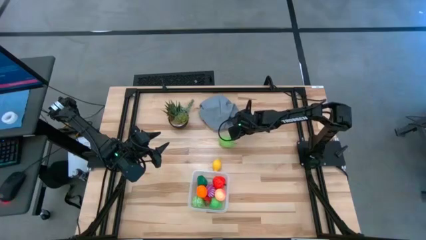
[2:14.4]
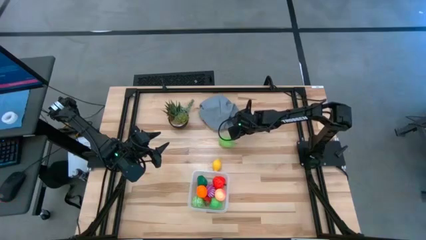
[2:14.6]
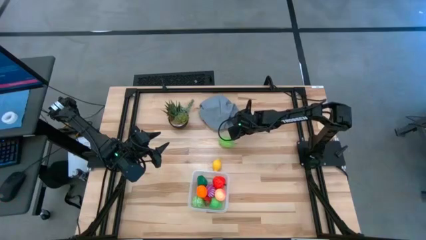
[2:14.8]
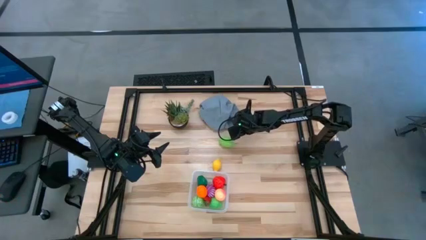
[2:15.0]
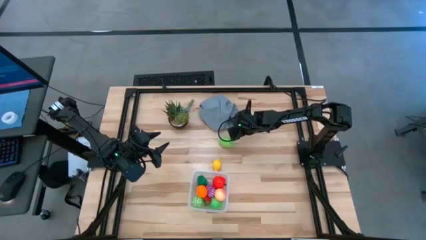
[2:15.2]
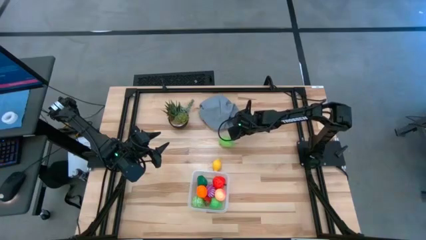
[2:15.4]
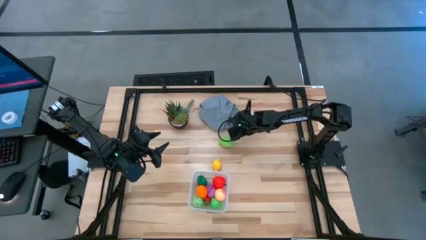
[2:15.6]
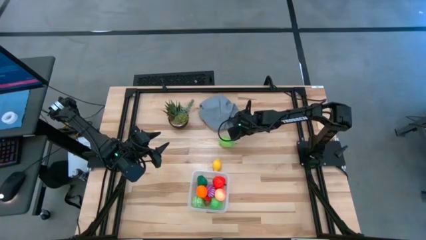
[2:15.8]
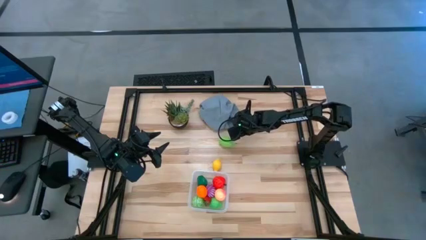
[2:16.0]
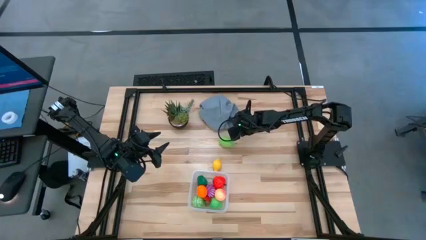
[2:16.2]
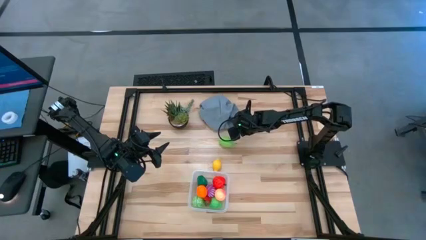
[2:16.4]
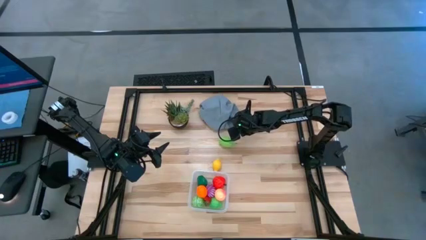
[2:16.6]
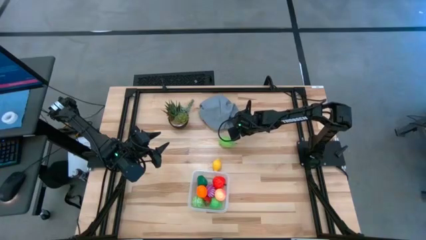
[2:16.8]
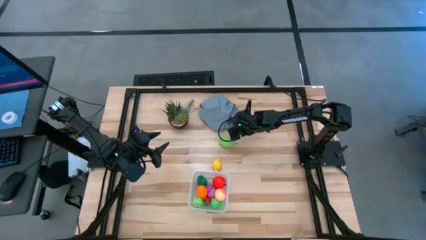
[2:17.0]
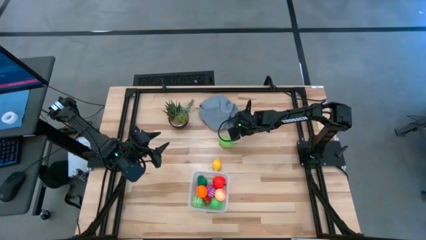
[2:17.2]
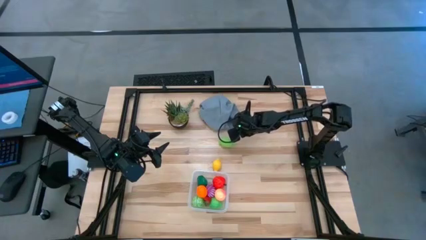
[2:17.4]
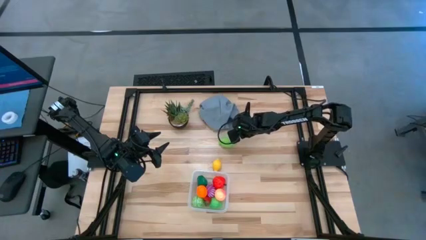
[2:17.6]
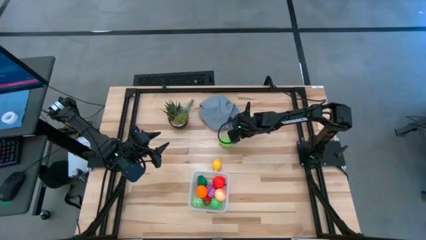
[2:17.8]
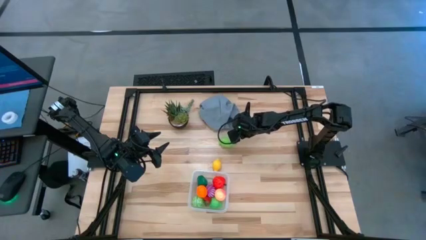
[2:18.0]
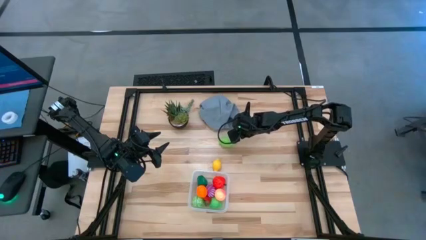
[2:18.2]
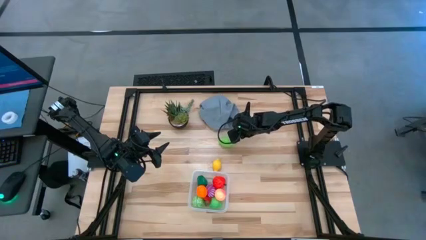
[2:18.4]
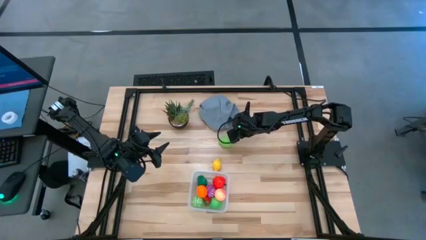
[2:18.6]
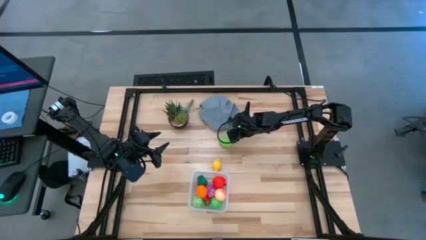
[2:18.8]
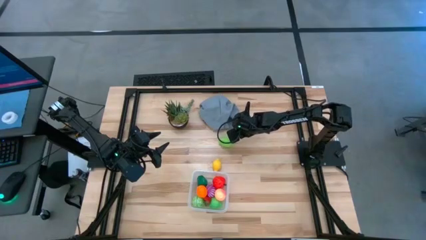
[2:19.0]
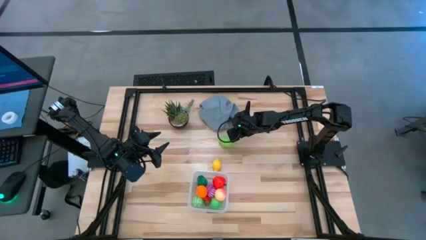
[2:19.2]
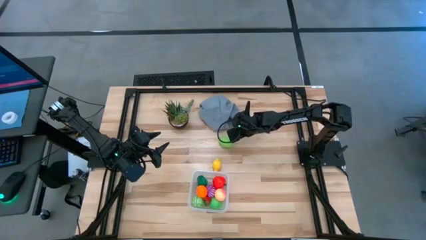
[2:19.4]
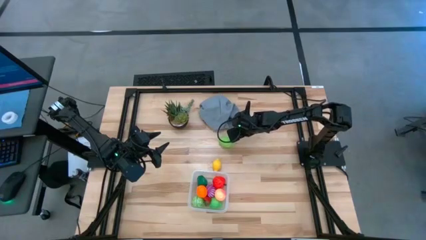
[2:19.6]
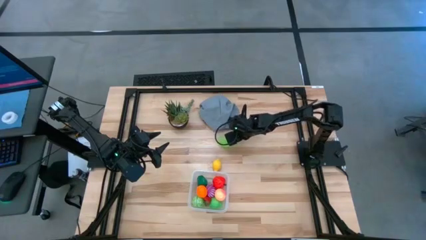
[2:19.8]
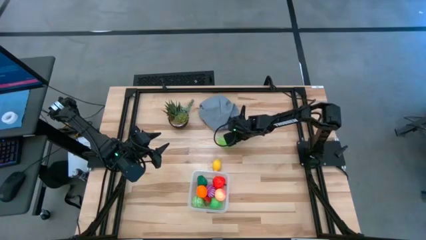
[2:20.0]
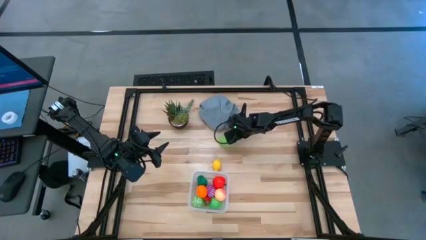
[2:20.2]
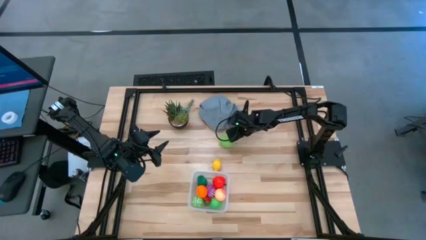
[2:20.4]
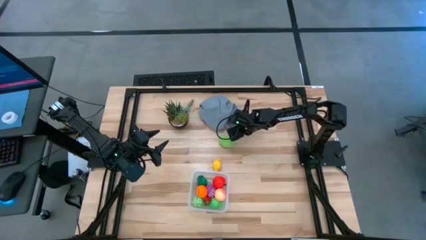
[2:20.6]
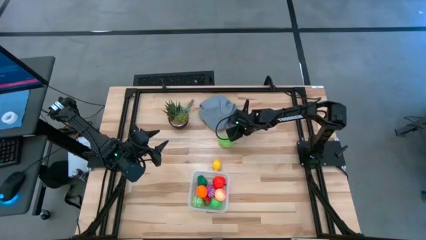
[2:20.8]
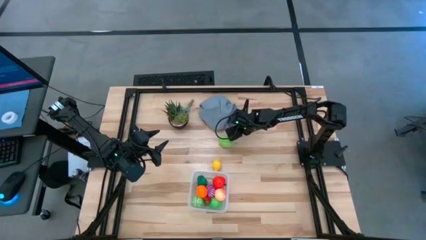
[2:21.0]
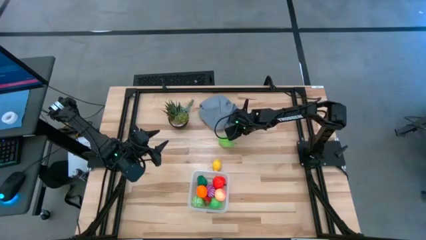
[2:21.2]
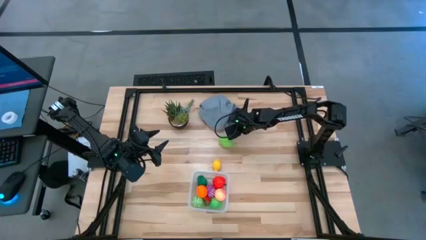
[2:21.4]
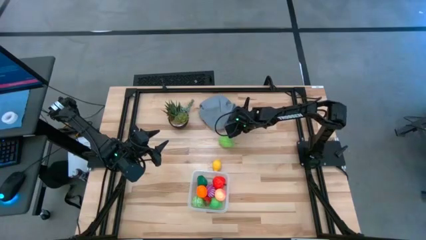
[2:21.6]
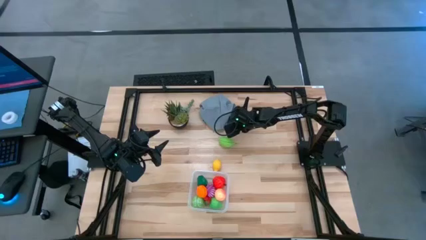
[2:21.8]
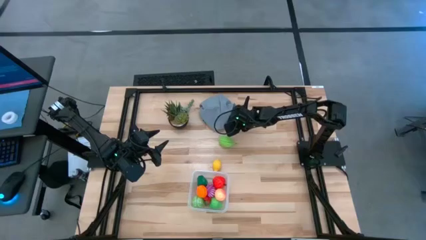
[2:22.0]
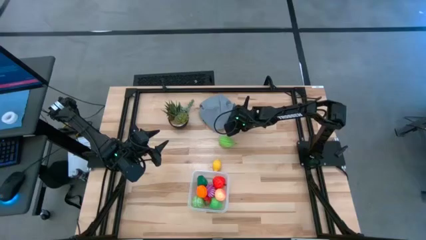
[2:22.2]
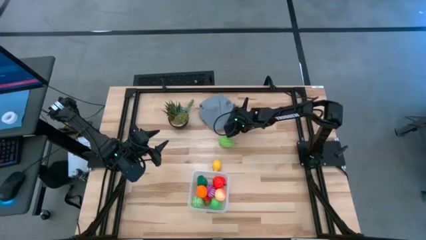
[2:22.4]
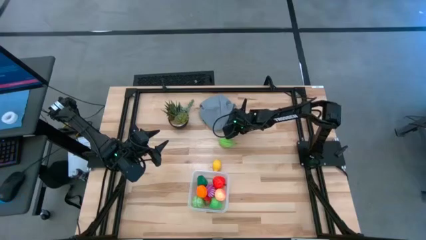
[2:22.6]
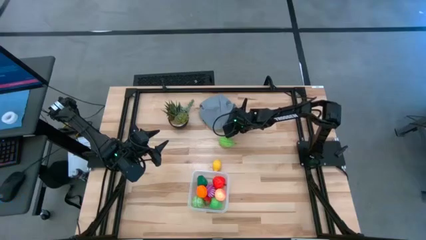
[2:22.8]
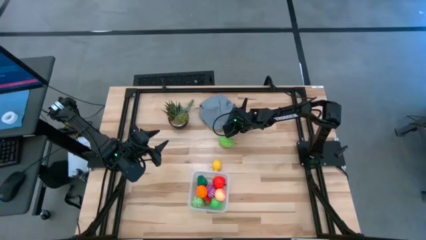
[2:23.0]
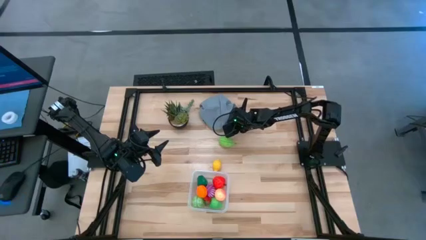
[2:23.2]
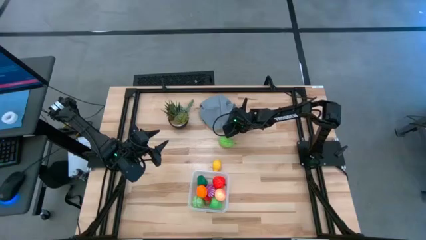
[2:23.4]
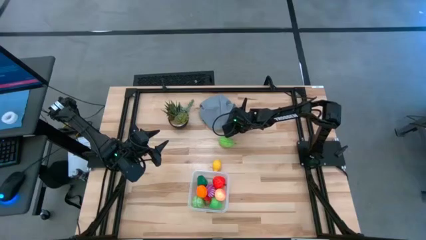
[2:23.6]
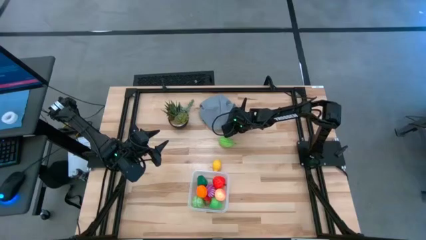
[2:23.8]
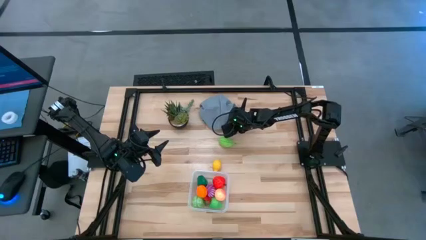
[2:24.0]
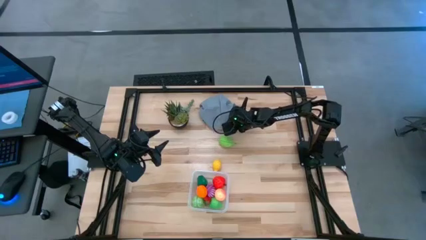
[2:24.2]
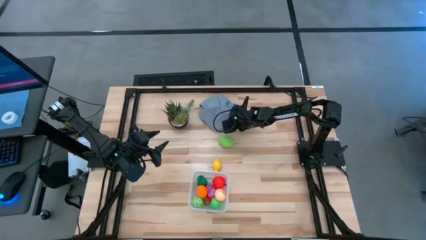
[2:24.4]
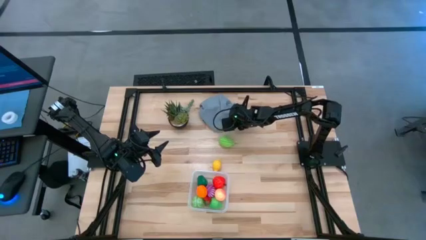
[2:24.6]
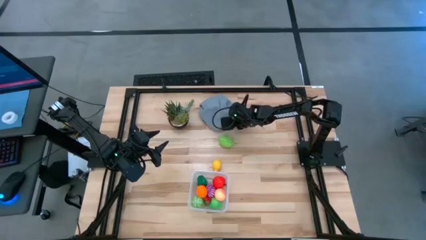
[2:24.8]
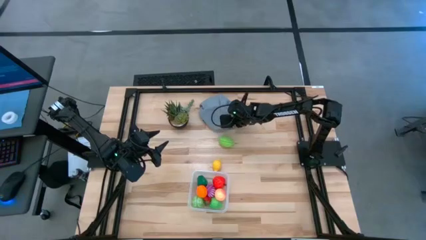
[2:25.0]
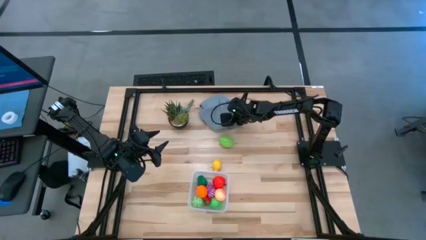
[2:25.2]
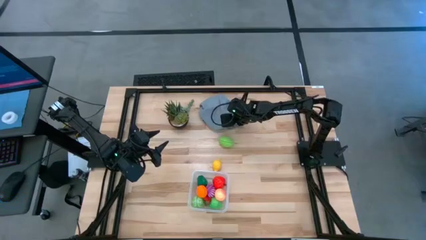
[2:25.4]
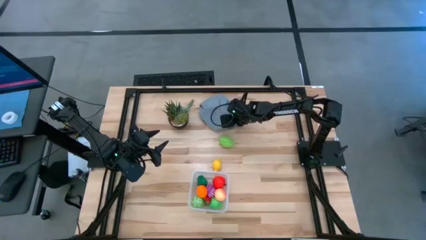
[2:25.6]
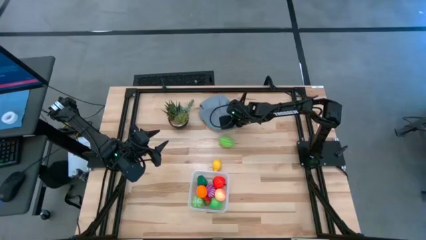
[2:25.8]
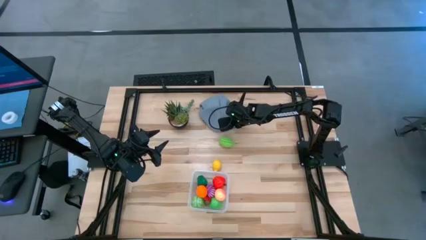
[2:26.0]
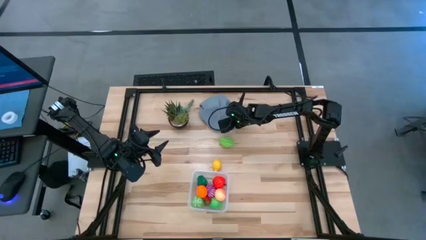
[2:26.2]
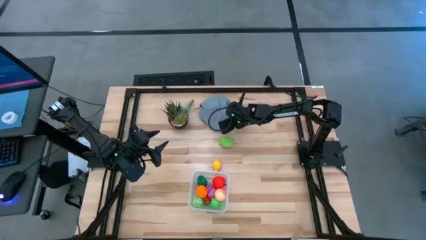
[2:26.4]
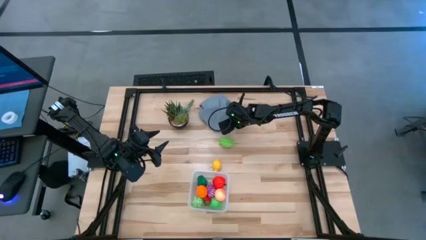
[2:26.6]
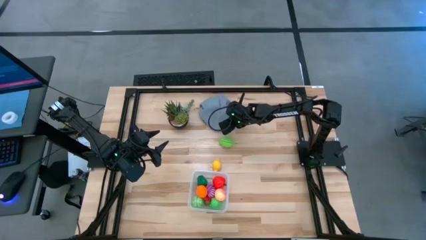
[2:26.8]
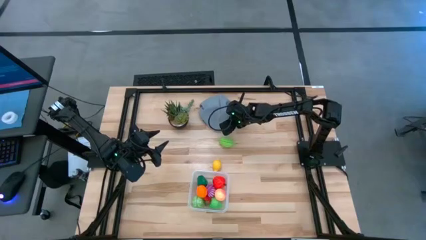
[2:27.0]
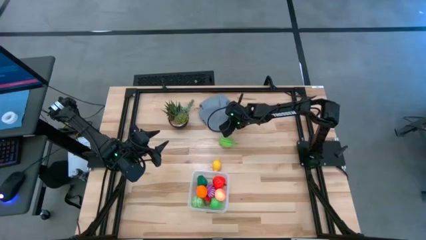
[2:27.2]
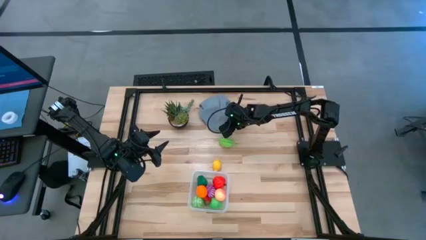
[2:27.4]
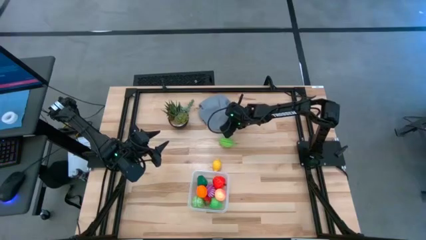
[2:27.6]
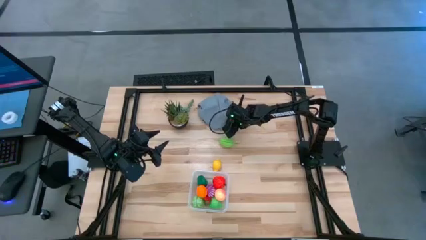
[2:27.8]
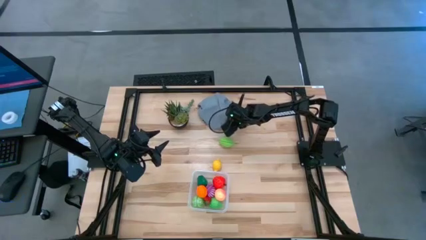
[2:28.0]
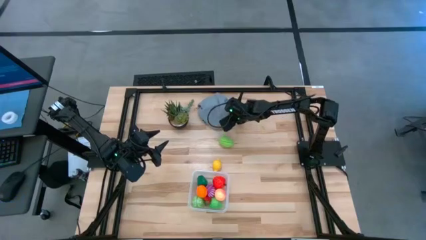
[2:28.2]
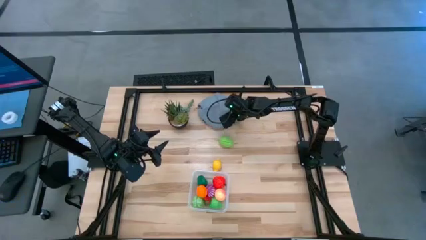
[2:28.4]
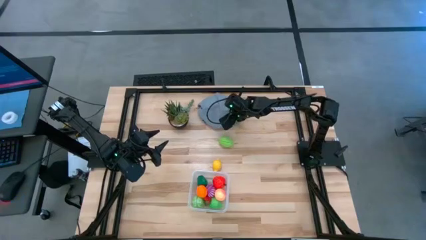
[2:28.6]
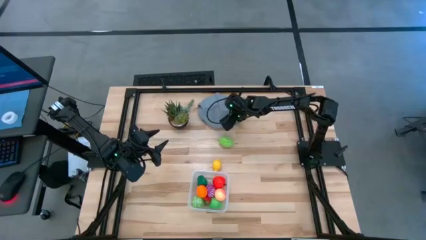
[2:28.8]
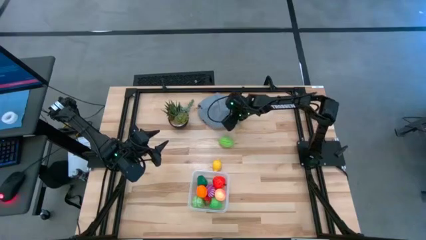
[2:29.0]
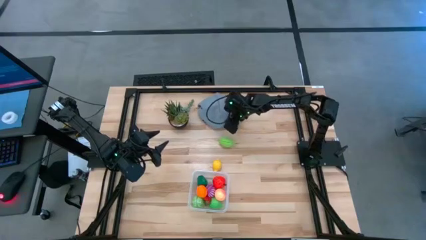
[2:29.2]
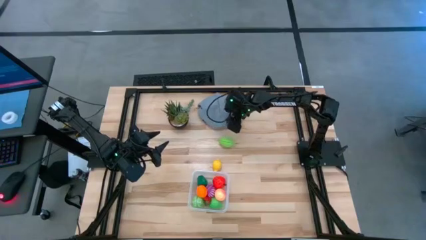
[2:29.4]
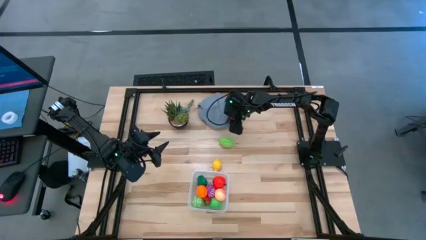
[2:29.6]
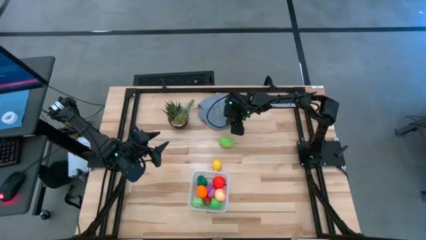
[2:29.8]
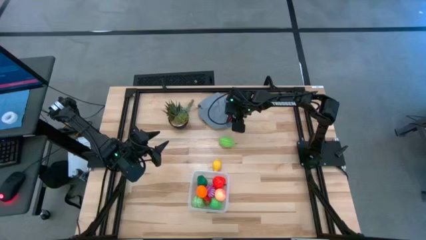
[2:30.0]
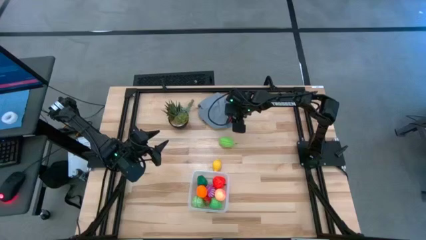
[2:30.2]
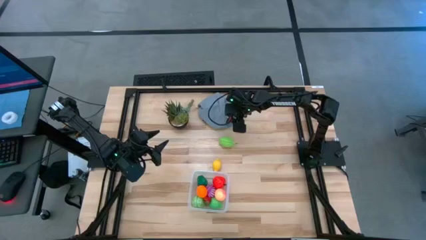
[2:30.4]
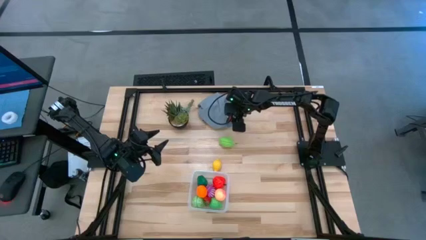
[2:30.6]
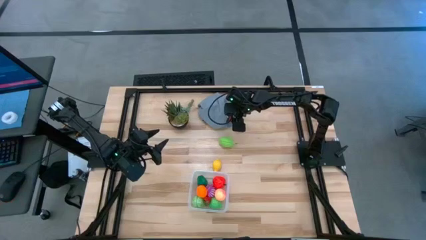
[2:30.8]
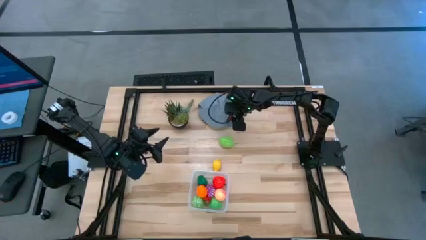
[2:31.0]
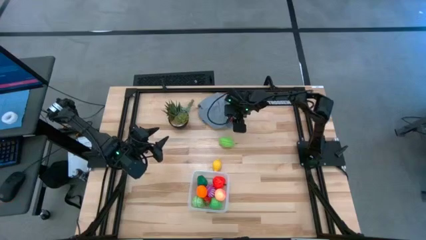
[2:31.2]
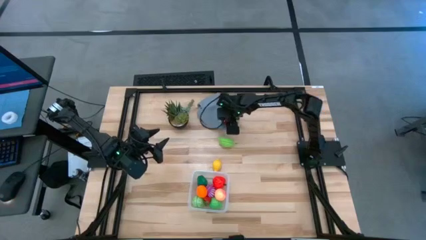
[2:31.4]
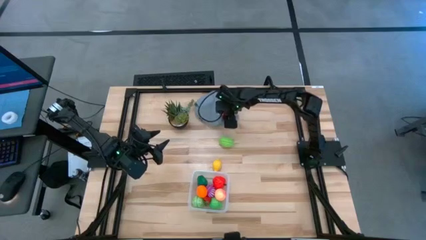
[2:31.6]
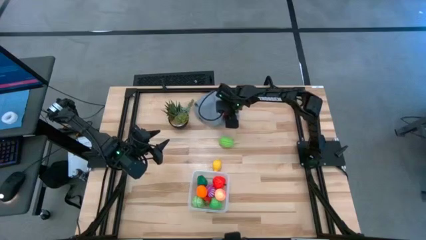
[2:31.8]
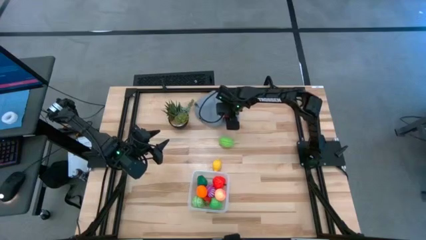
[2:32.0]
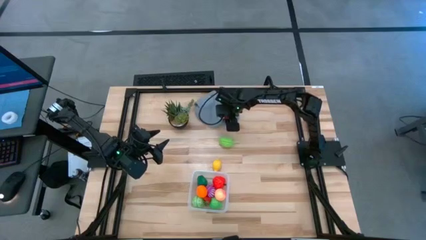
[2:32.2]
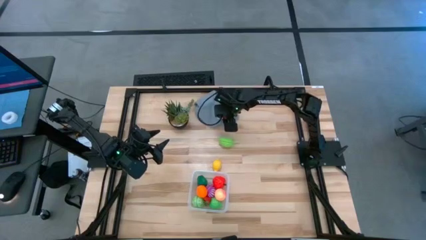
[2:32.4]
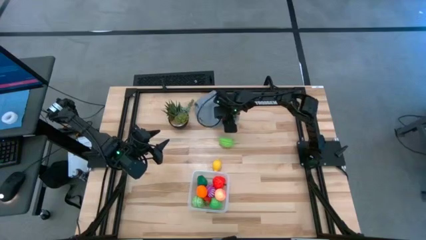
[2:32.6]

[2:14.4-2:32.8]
Task: Pick and placing Produce into tupperware
Put the red strawberry into the transparent bin
